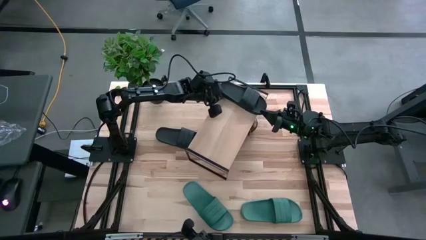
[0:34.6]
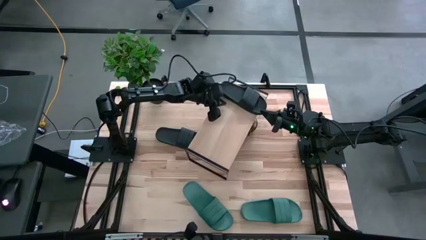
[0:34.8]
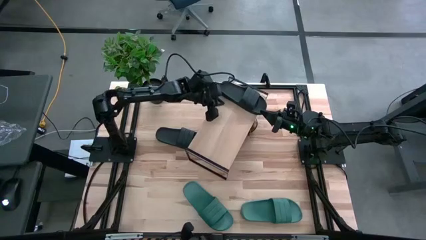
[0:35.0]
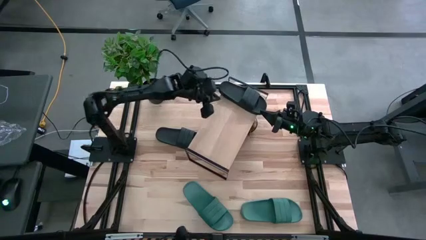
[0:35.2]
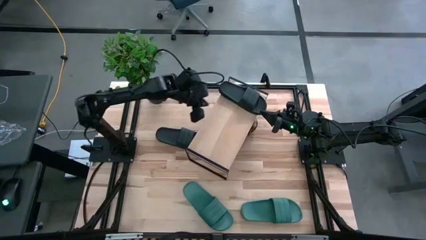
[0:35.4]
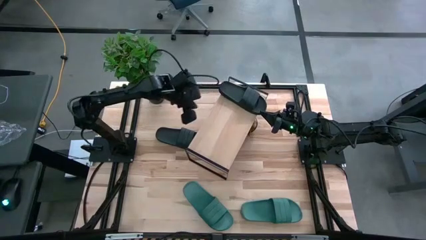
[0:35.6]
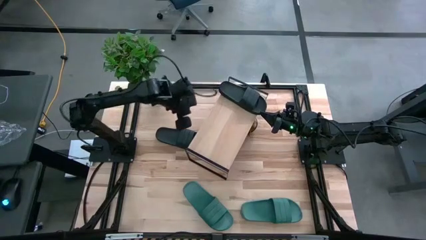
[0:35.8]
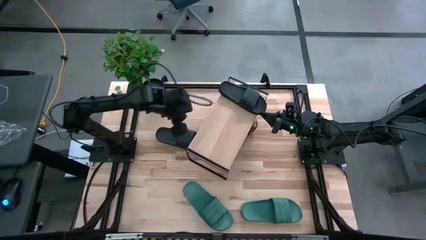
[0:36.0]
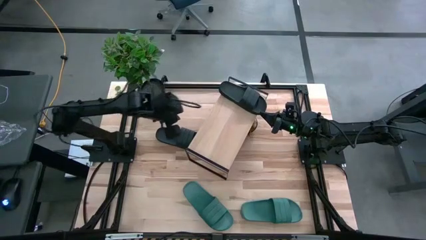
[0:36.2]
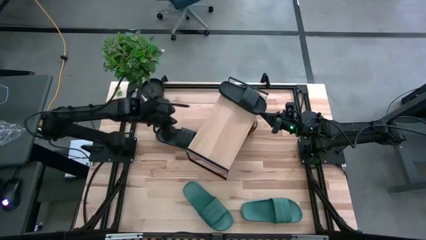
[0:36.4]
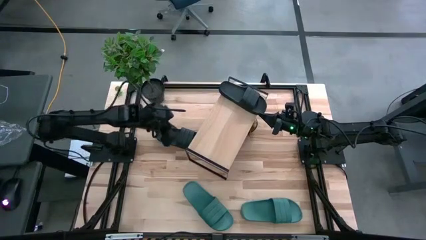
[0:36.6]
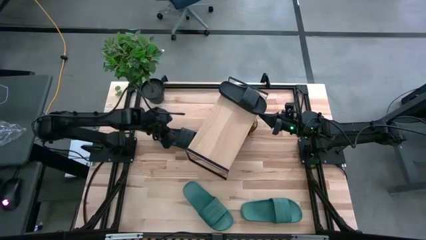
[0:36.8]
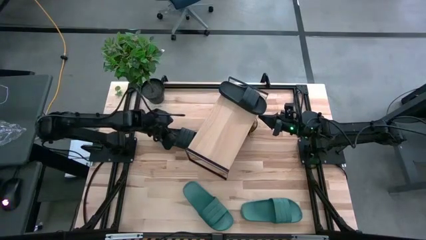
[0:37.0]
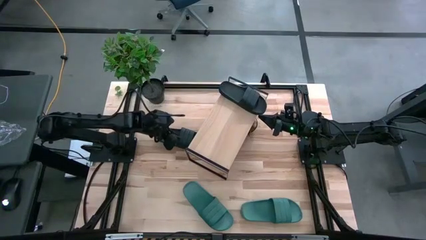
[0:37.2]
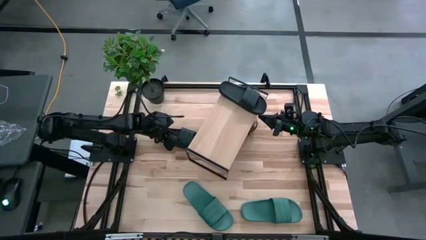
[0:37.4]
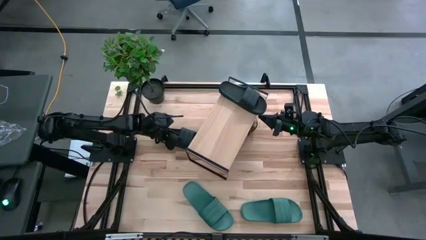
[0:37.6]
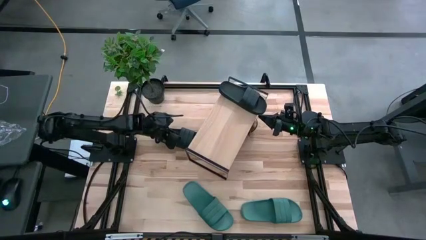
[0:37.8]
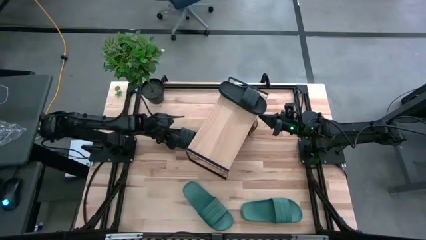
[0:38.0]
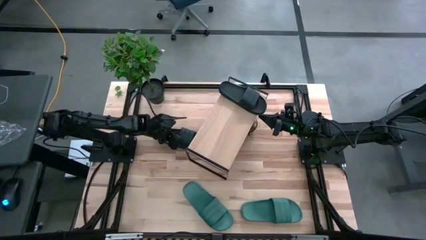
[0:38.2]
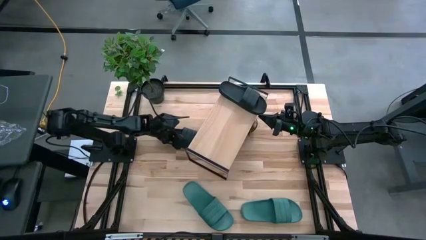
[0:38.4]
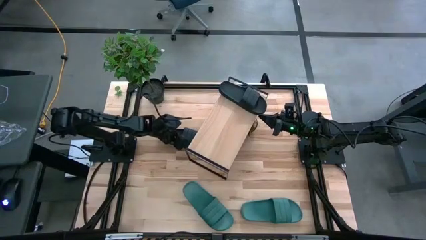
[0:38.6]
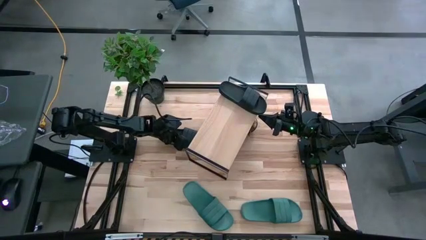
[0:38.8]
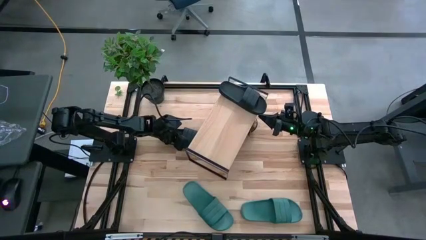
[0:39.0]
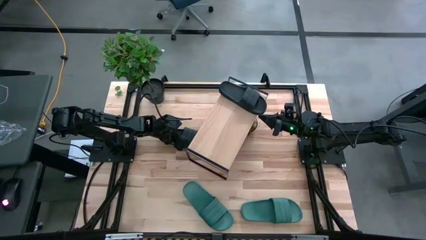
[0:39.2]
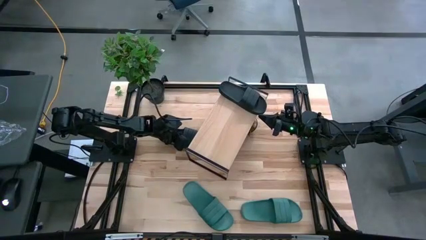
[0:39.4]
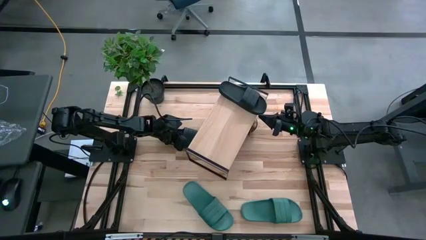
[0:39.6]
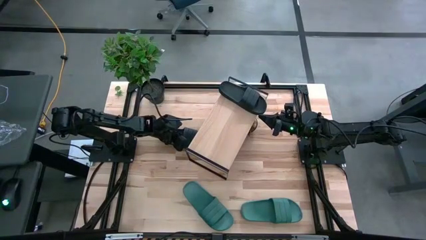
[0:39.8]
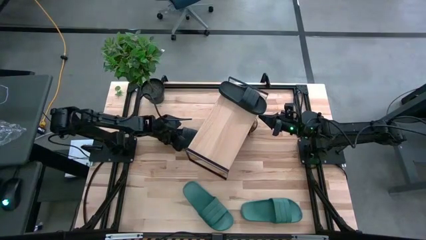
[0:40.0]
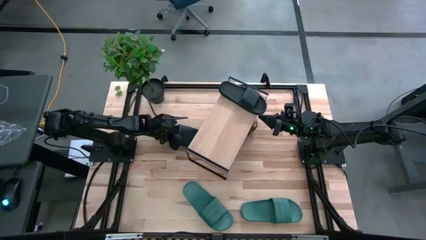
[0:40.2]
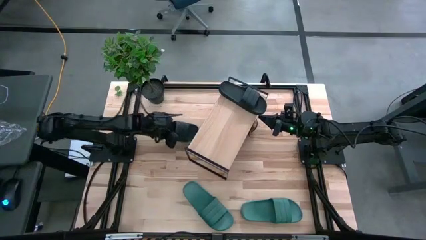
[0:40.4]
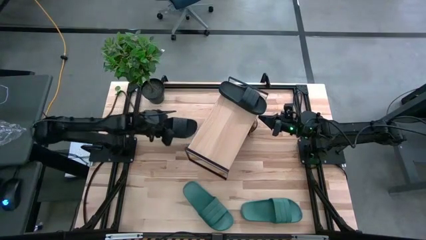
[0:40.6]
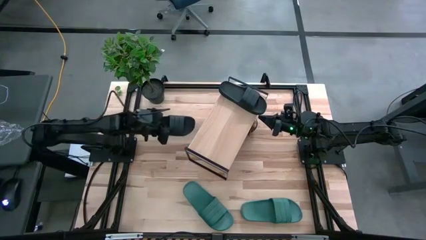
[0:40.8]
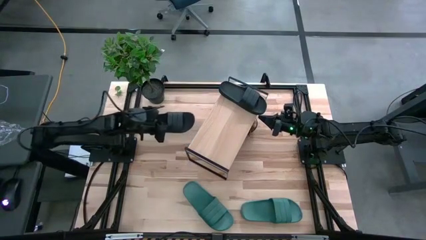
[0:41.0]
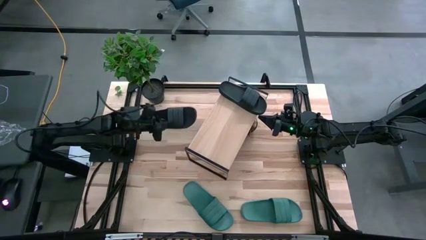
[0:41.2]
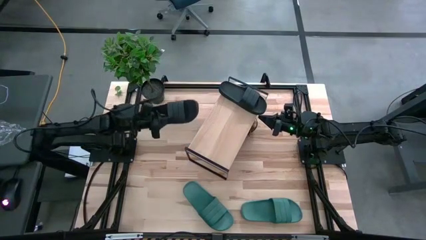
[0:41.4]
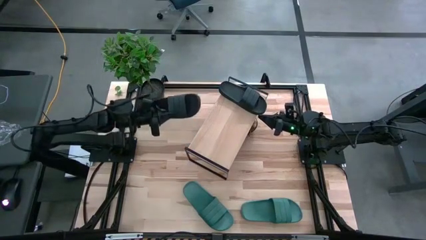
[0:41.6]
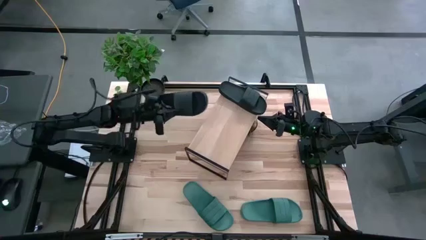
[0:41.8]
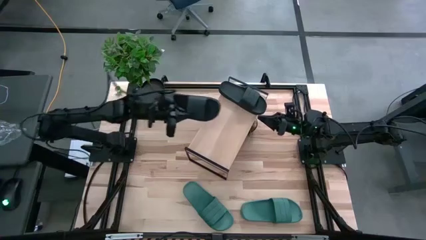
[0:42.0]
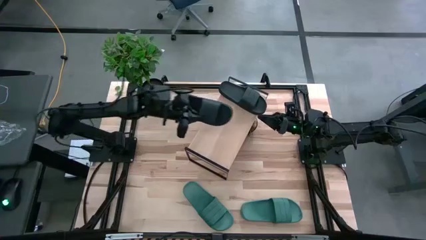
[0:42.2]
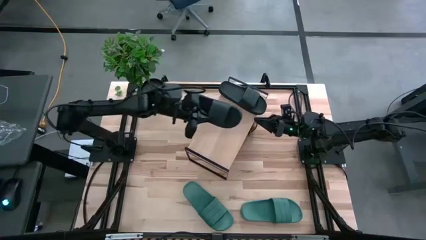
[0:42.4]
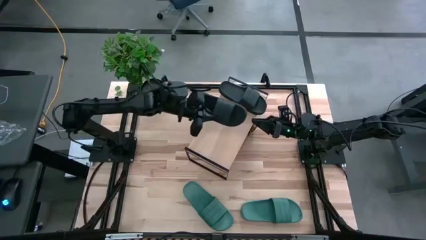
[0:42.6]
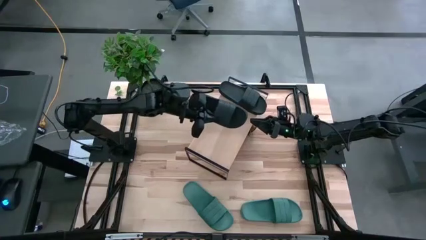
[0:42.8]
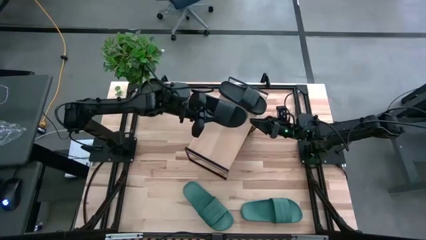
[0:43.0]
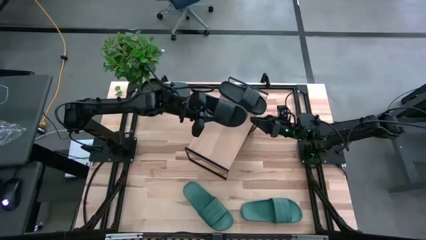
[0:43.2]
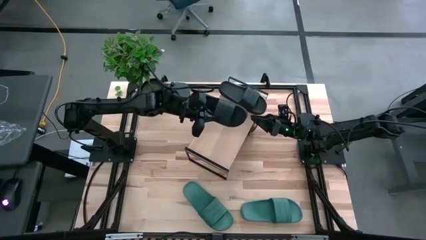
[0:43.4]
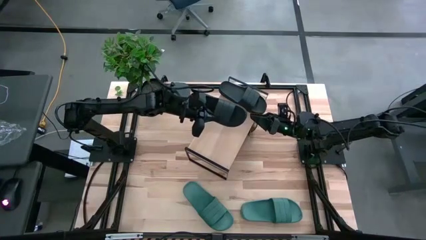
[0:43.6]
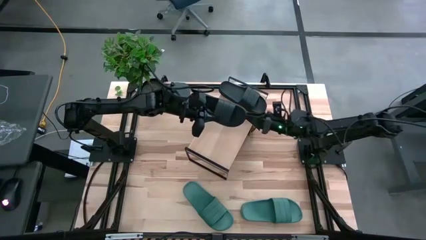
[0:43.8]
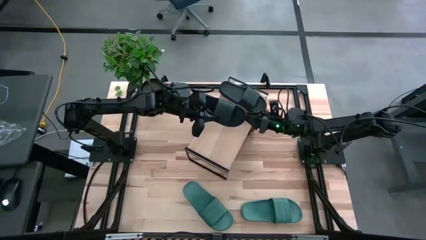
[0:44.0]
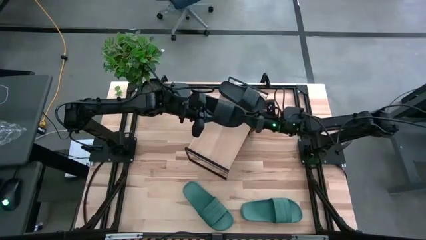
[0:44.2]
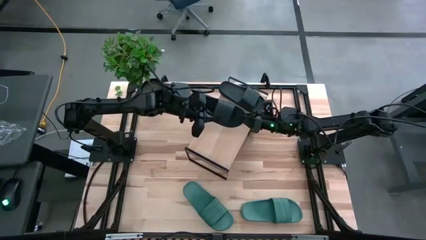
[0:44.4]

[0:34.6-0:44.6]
Task: Pick and place slides into the shelf
Put the black slipper on the shelf

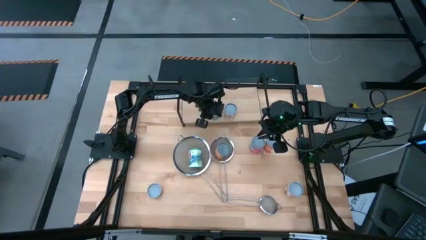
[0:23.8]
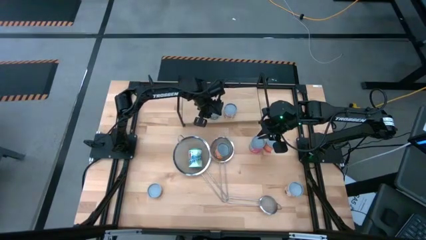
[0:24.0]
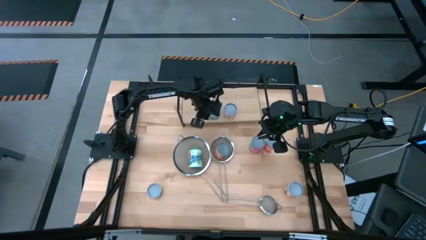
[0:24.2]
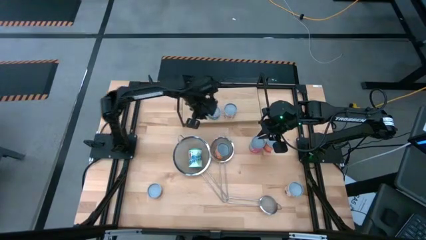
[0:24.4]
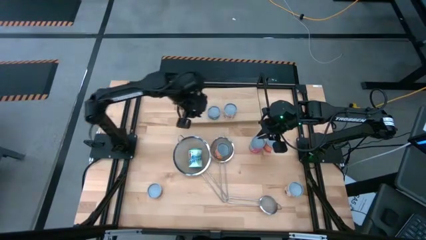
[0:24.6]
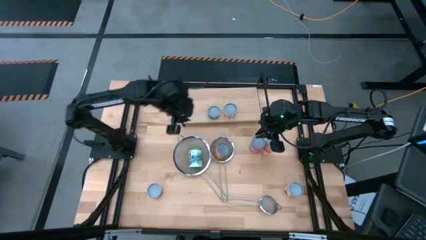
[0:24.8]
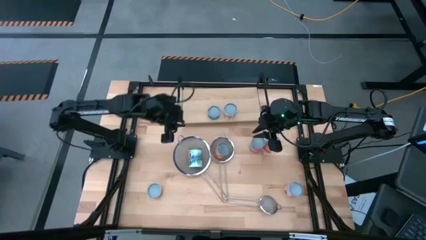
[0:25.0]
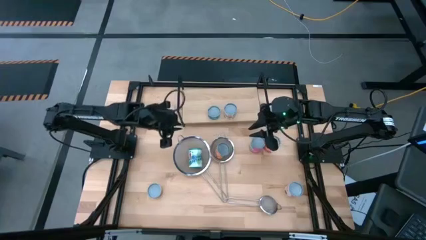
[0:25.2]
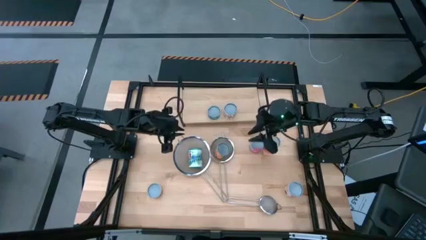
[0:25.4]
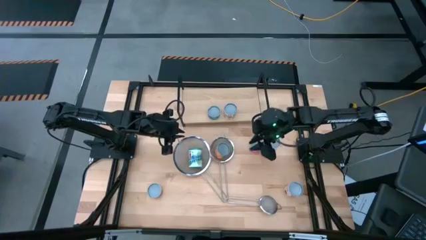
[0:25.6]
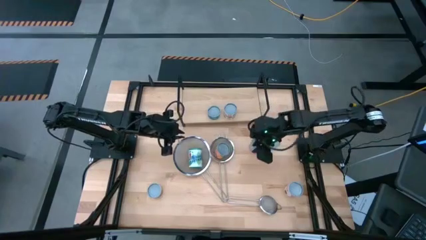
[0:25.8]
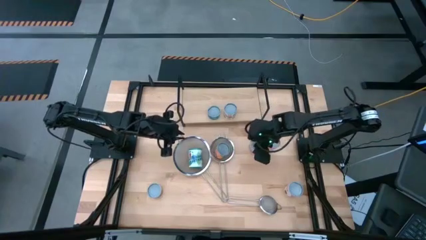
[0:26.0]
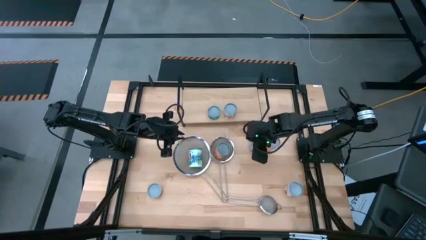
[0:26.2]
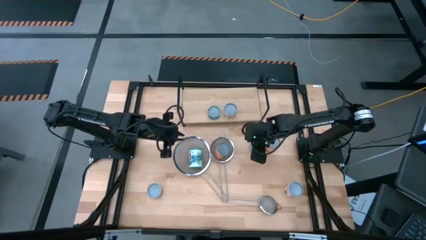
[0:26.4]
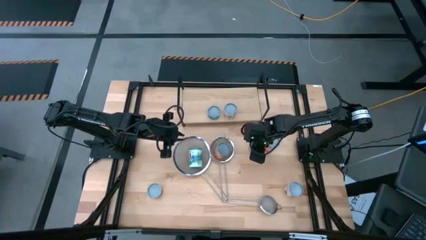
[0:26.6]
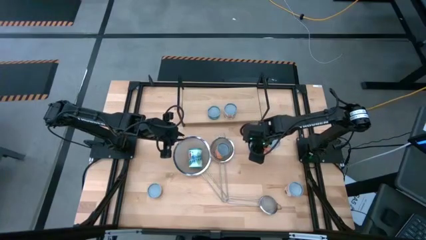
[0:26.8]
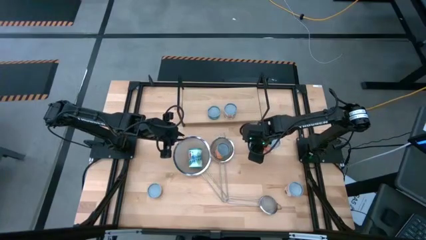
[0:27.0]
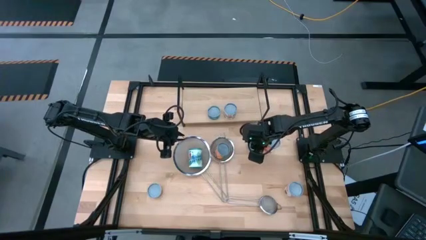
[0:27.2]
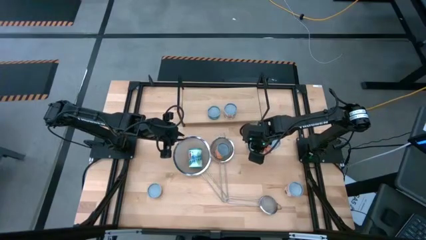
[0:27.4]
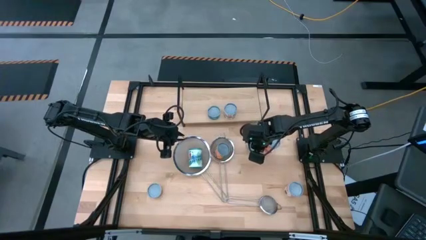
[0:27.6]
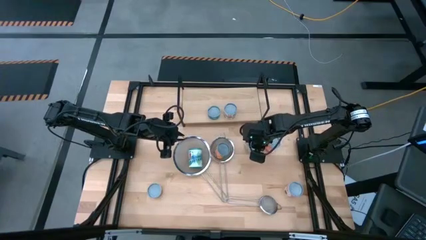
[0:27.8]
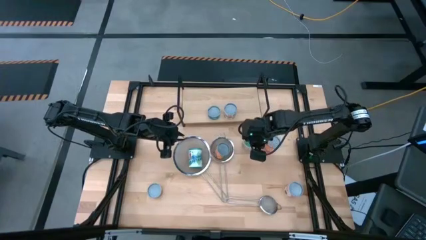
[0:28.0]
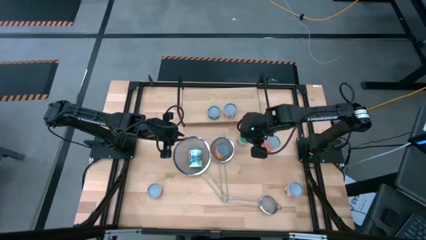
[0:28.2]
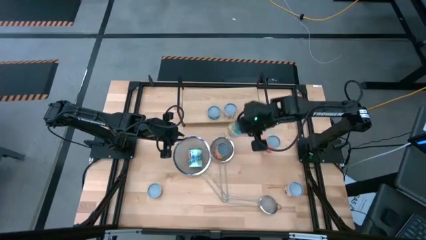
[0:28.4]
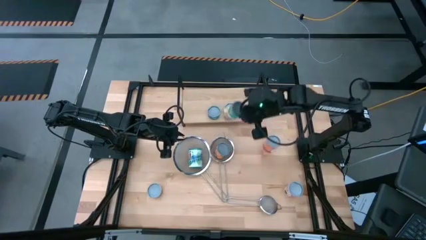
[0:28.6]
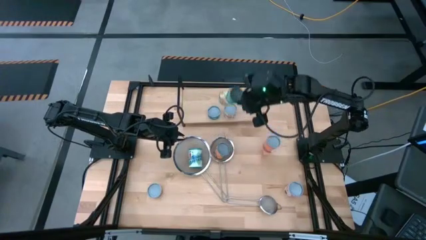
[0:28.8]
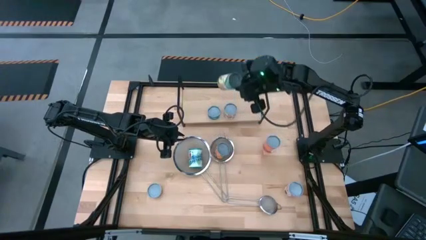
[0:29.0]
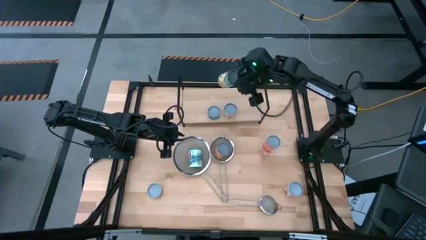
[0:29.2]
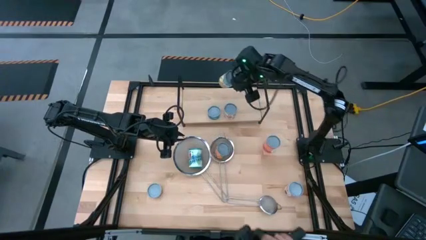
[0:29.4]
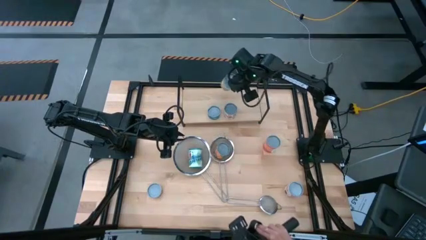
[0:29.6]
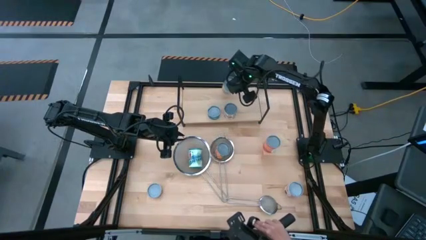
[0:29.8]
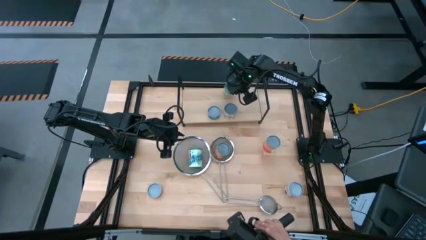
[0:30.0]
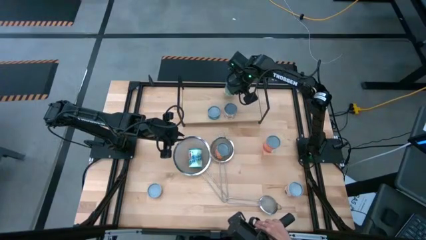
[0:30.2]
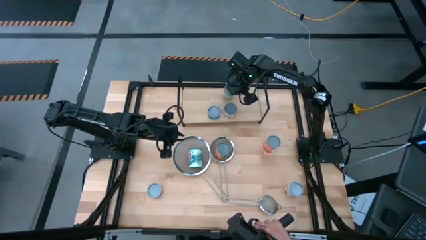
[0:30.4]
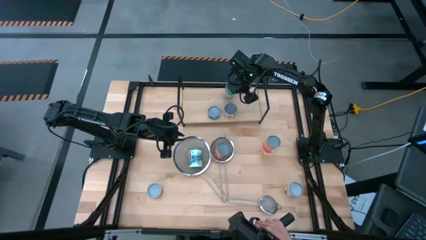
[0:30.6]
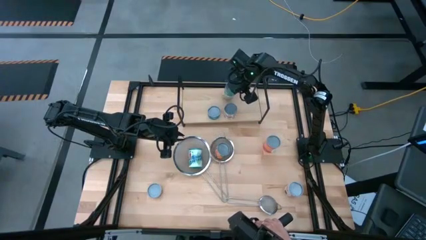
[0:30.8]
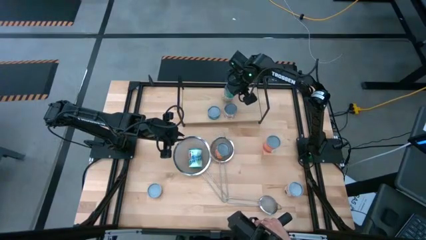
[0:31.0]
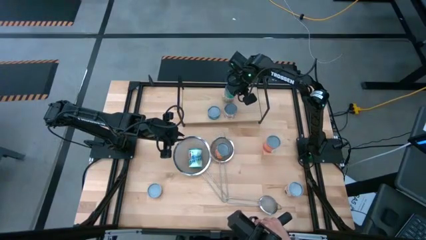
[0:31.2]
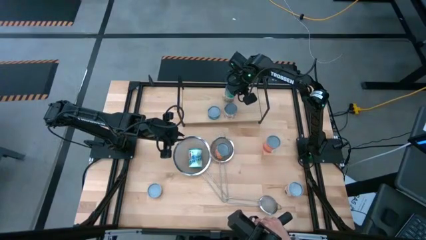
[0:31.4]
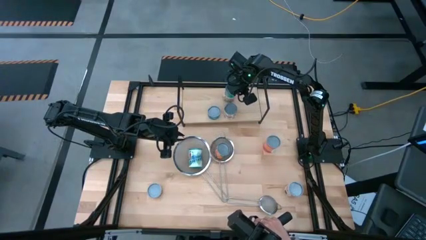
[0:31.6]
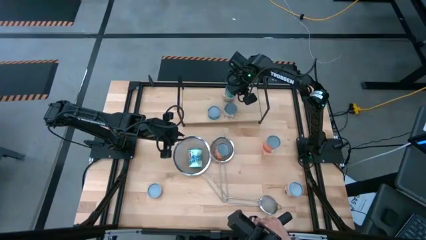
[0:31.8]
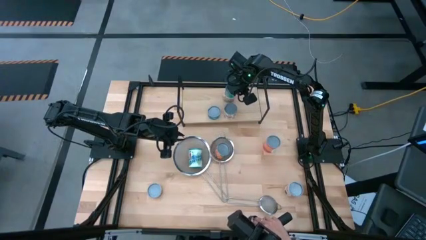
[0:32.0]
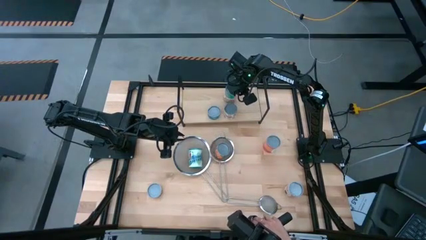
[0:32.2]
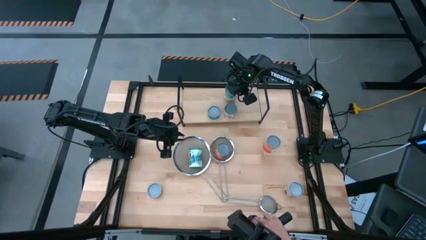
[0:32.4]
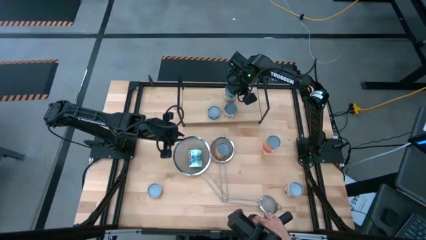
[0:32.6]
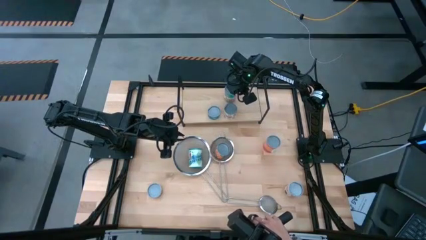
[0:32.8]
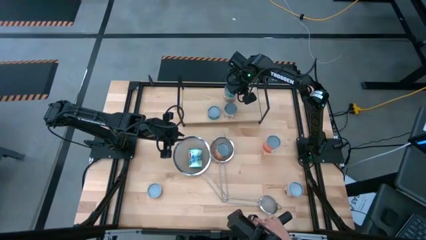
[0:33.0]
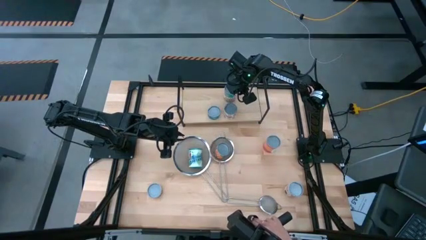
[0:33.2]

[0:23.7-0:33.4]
Task: Pick and place cans onto a shelf
Put the canned chicken soup on the shelf
